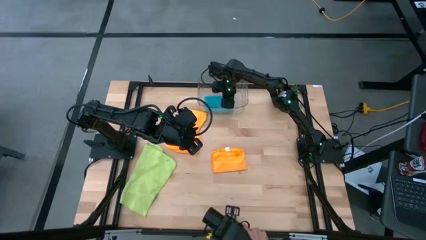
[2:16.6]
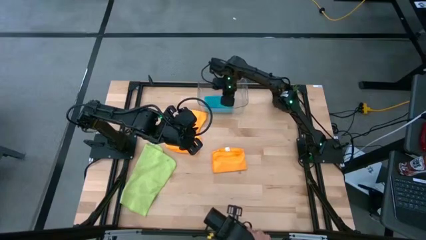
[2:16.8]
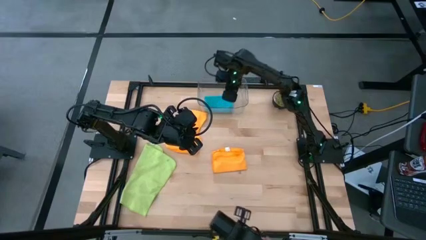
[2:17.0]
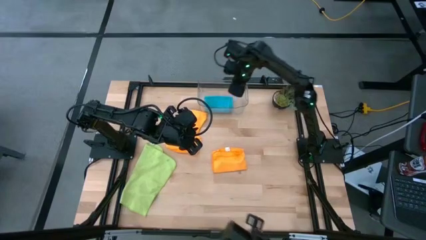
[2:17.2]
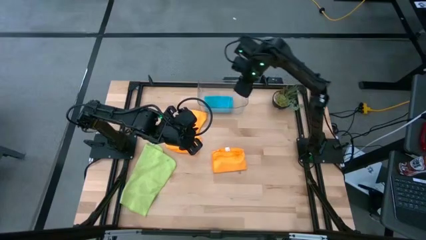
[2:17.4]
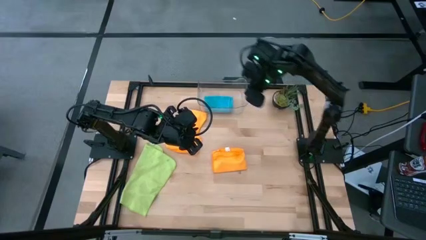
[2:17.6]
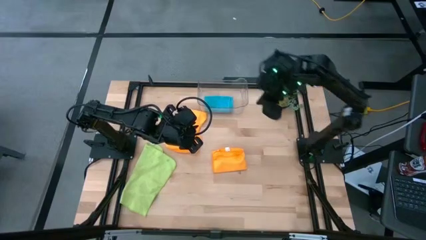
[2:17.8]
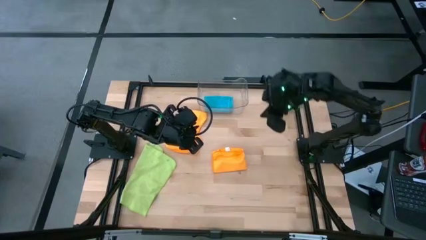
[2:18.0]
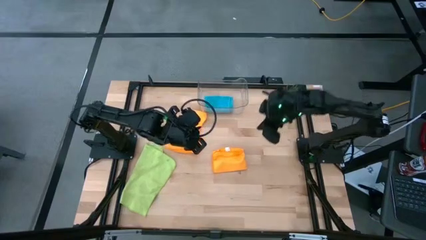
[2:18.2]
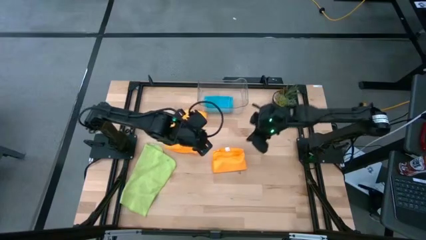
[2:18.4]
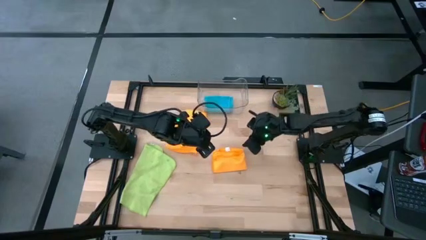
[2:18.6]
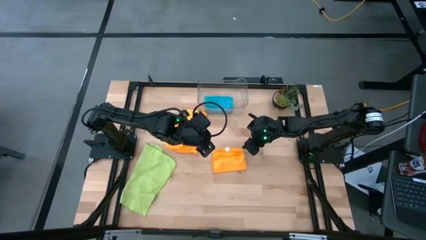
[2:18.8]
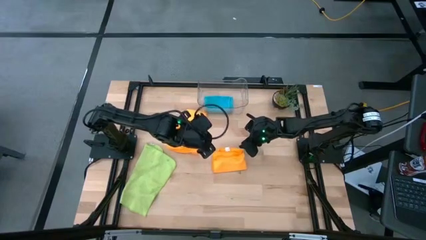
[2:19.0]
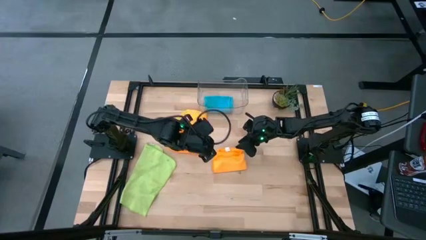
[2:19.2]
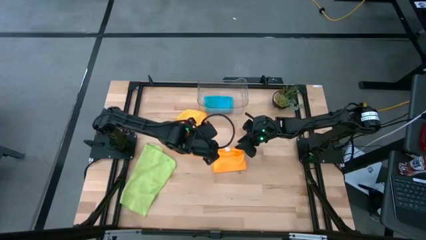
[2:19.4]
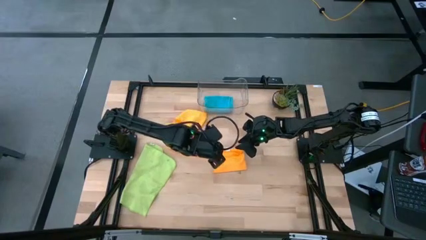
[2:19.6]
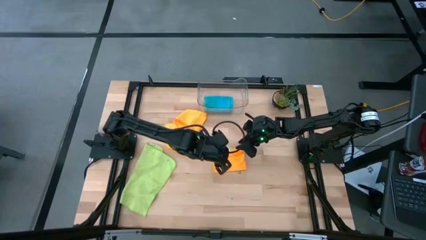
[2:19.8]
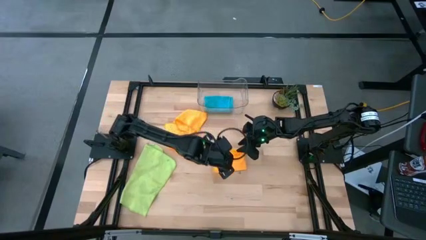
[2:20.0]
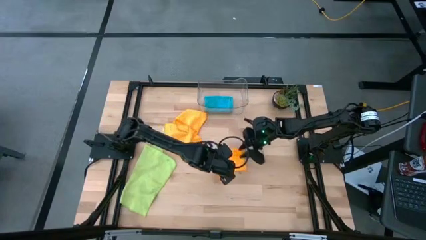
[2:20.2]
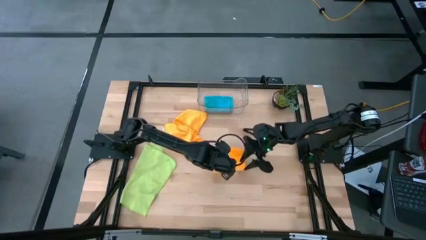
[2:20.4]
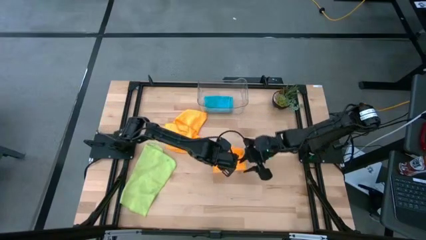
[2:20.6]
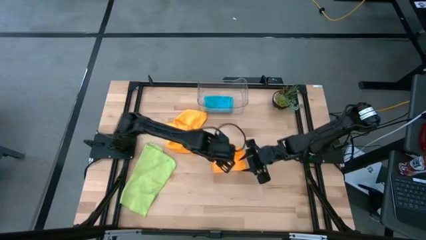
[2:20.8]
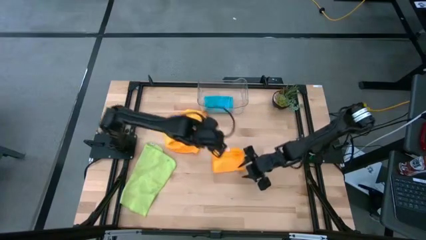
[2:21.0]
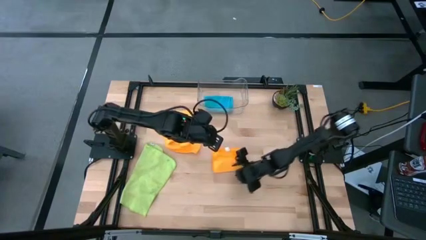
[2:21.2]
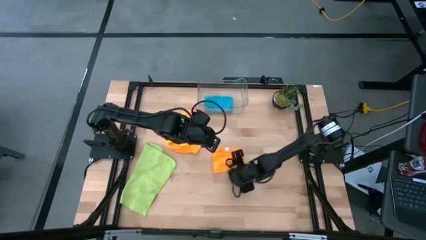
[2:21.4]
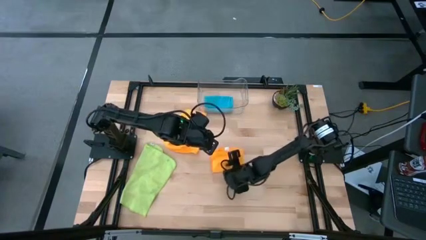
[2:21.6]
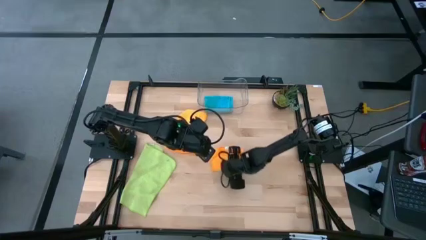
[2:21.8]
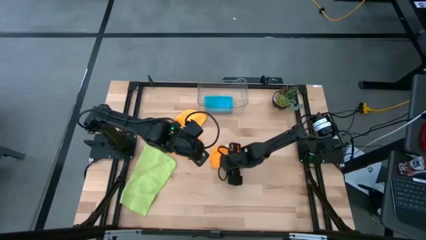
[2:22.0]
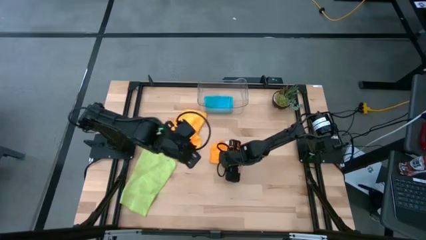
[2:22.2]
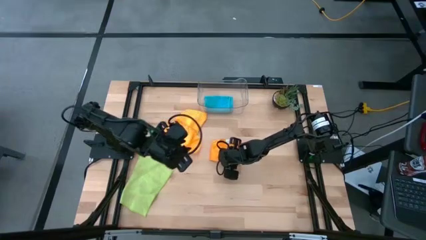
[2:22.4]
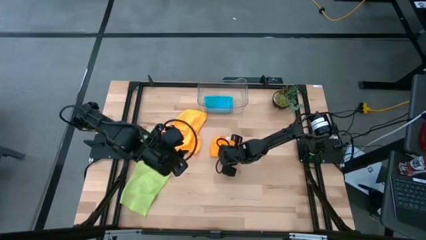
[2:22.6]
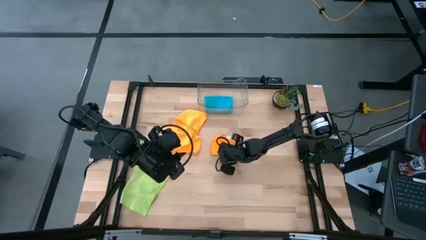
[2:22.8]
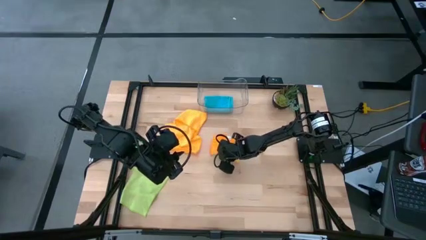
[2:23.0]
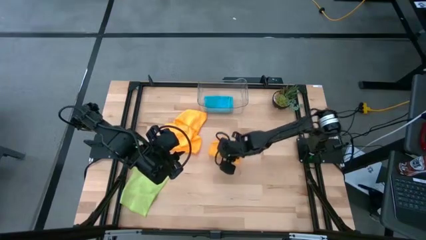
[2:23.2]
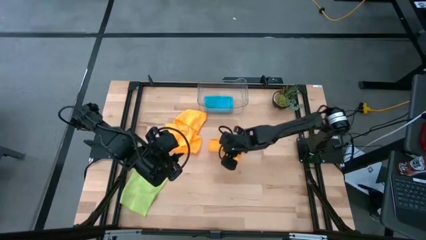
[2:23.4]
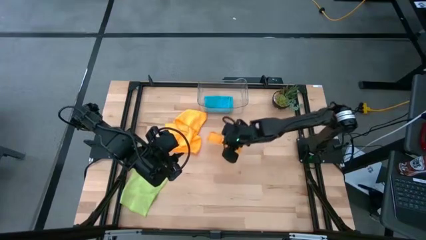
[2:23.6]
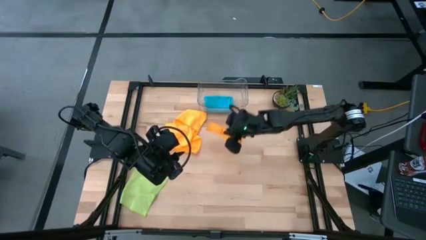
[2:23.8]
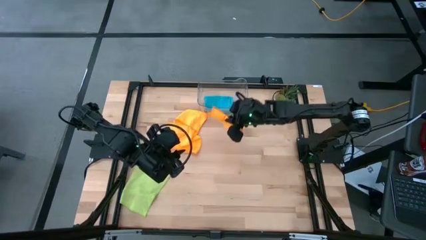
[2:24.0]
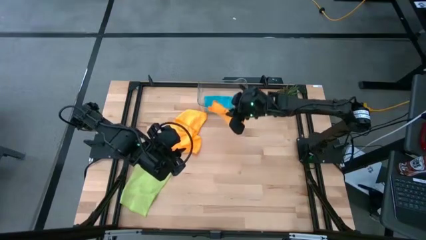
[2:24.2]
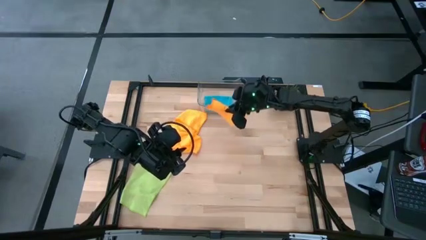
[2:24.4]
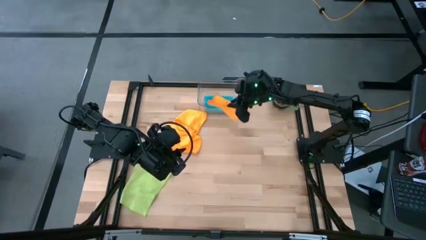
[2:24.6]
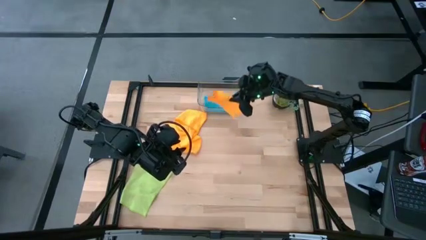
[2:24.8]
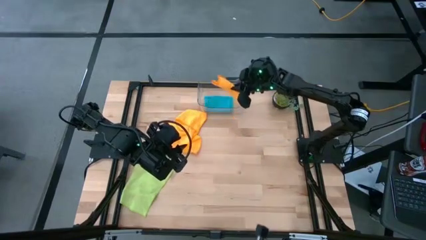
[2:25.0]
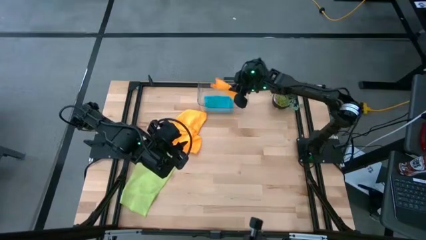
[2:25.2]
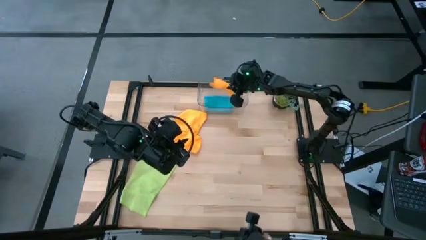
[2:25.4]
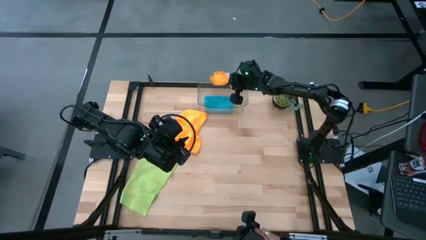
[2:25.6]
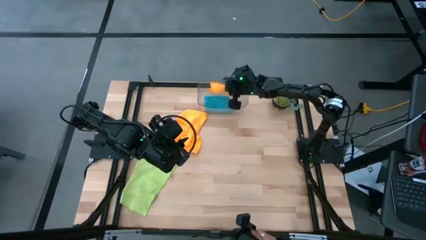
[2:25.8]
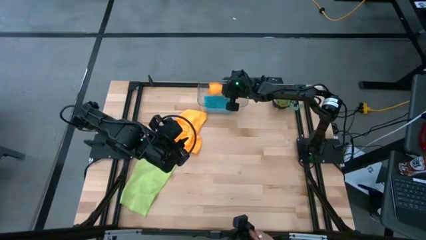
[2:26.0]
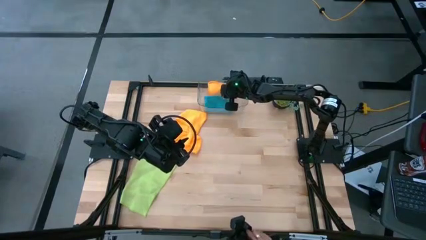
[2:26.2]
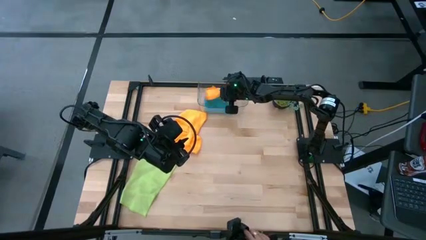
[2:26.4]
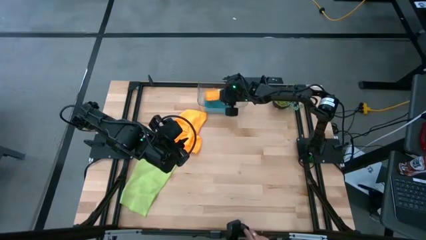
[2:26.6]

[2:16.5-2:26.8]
Task: Fold microfiber towels
Put the bottom orange microfiber cloth into the transparent bin

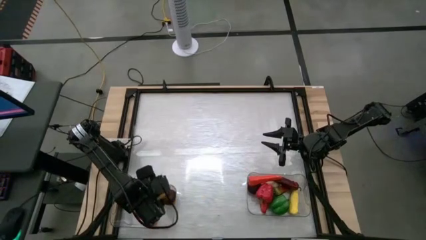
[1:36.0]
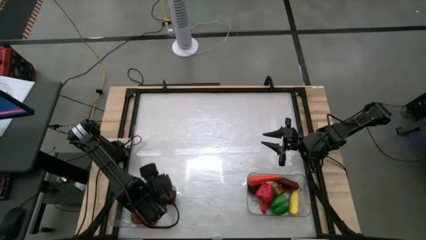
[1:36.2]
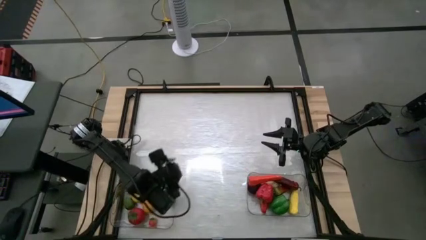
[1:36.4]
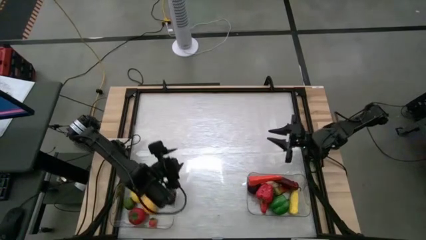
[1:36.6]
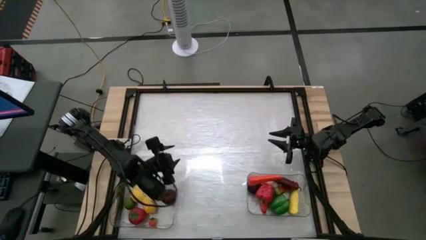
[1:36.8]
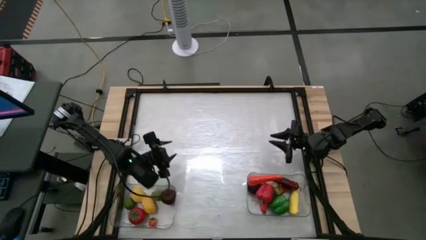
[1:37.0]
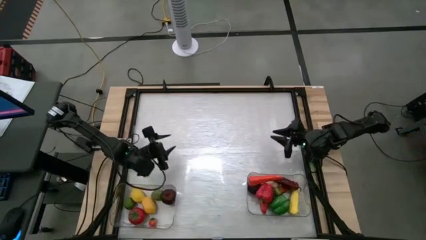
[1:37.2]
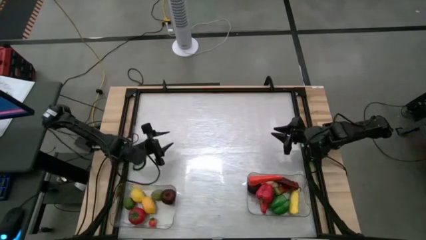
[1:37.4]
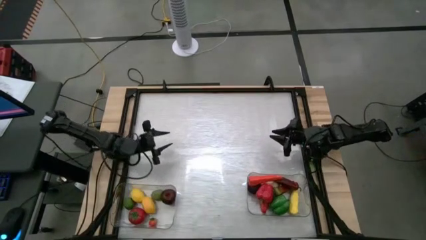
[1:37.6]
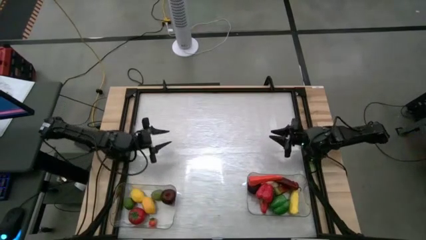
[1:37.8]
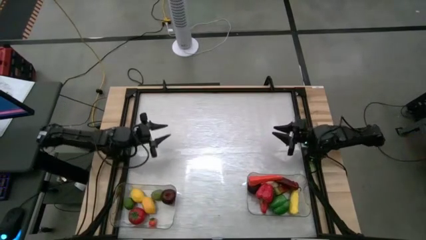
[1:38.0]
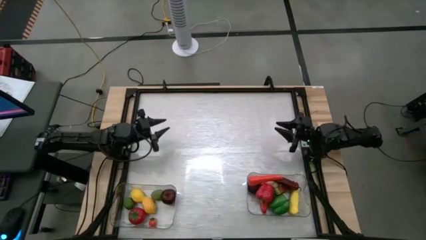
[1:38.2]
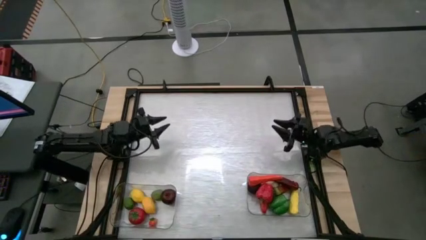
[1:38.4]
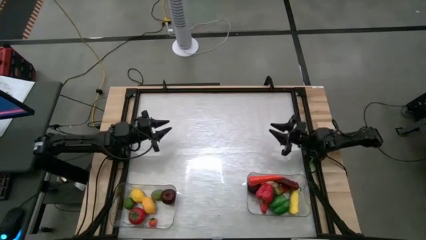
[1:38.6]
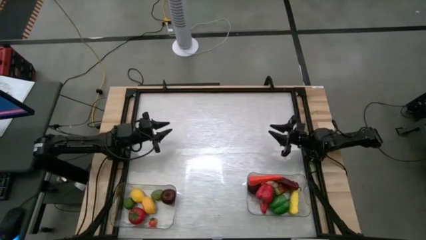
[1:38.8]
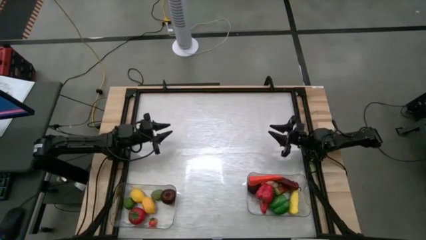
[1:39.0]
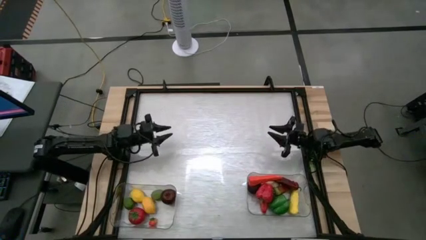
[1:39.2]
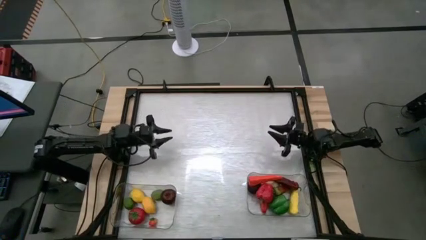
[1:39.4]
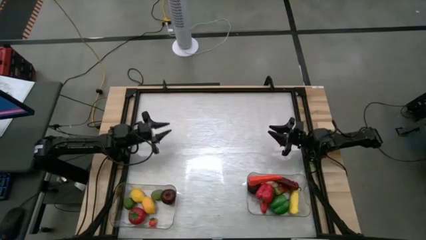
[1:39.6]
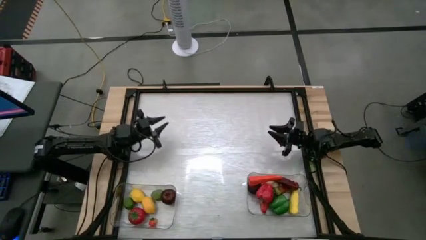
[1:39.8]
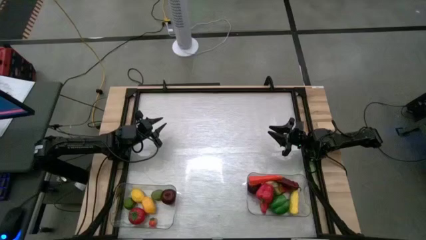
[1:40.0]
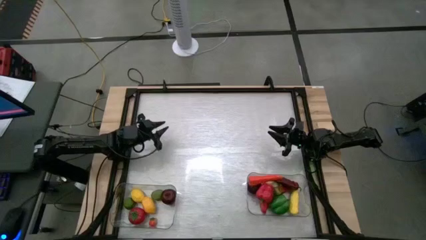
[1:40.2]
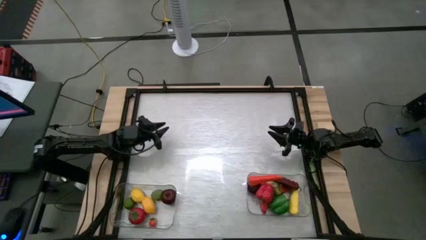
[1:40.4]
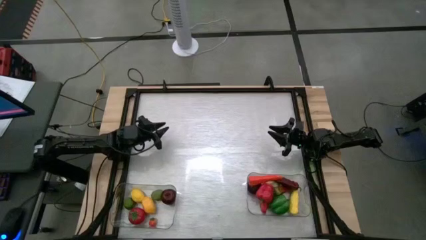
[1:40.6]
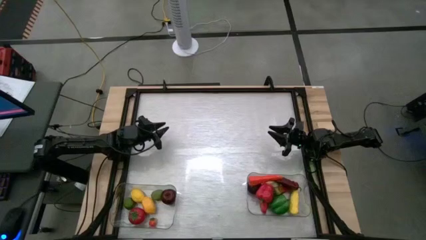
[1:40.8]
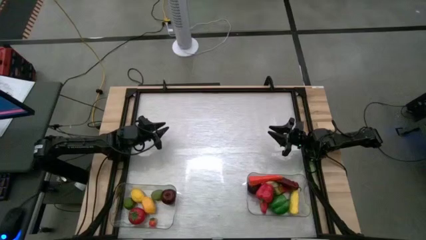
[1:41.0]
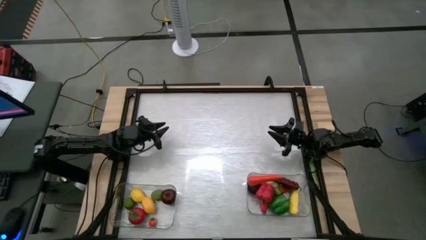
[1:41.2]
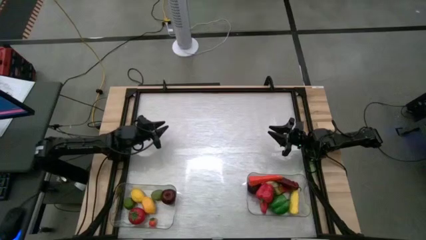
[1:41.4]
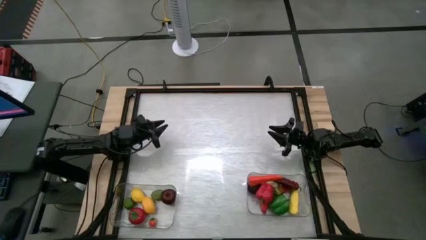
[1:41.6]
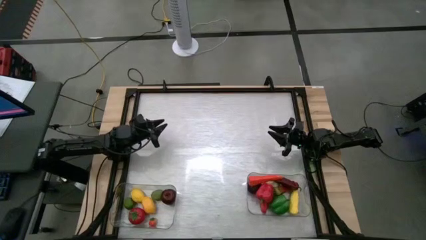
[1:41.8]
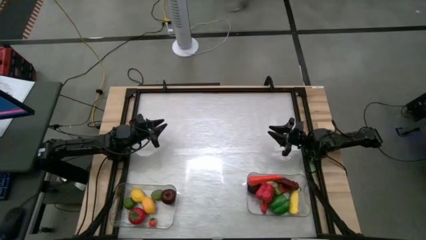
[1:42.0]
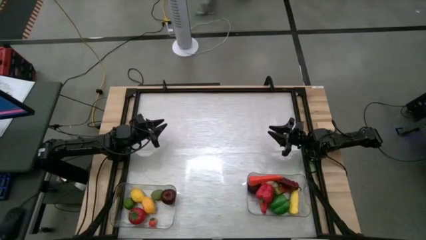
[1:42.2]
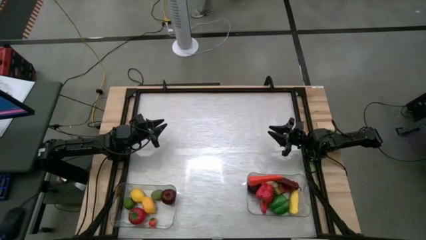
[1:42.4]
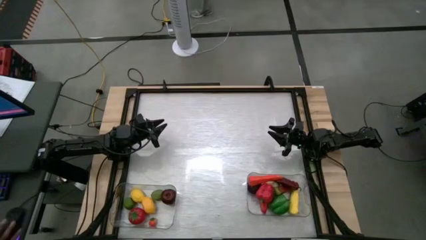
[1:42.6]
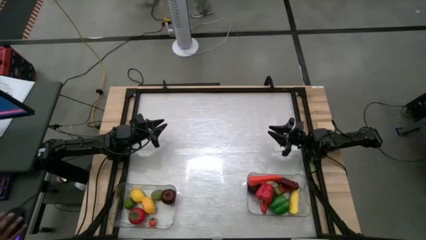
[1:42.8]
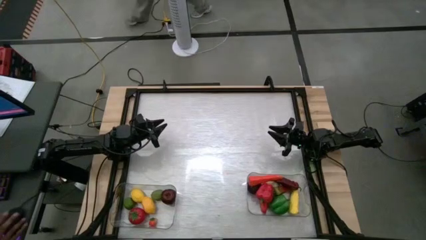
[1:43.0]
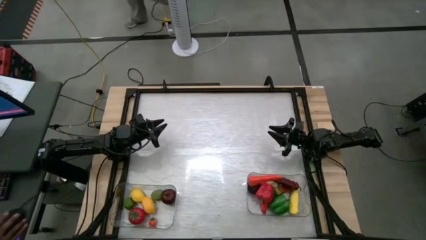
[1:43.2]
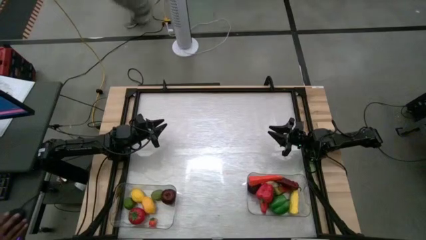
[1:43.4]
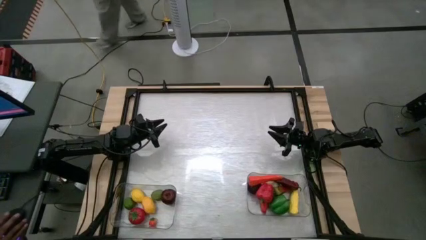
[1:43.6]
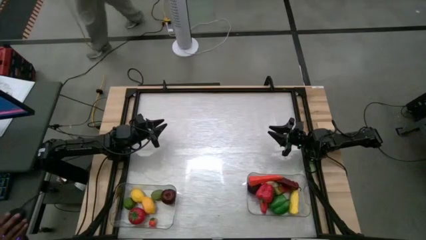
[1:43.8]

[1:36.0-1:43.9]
Task: Sort produce into baskets
Return to Home Position
